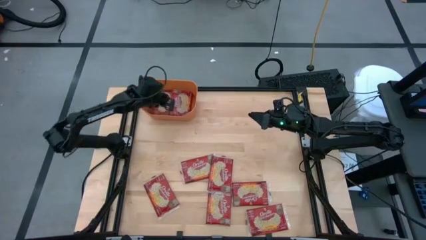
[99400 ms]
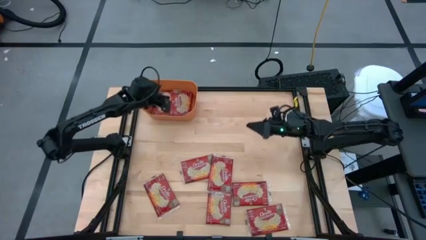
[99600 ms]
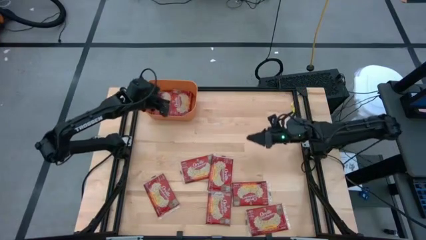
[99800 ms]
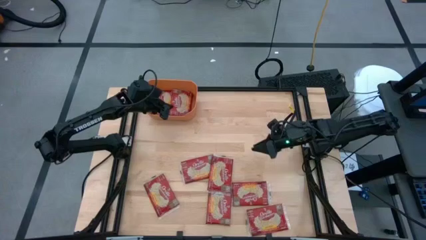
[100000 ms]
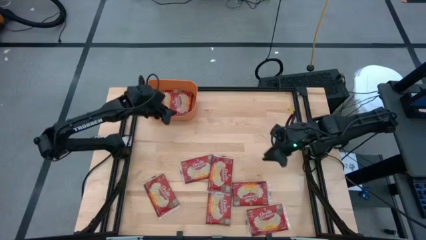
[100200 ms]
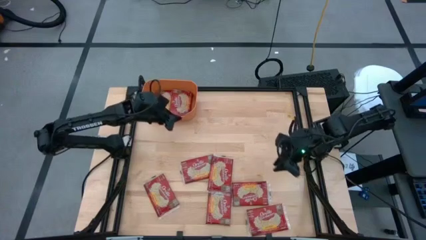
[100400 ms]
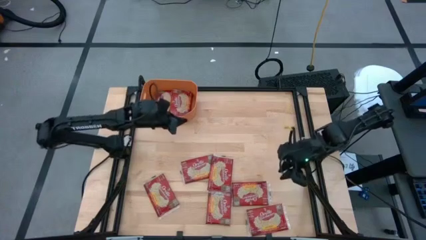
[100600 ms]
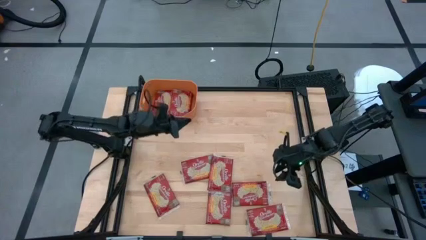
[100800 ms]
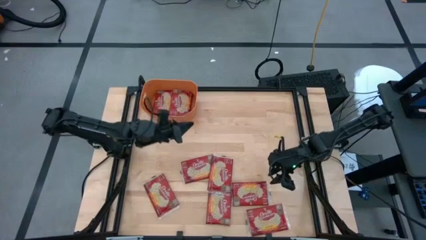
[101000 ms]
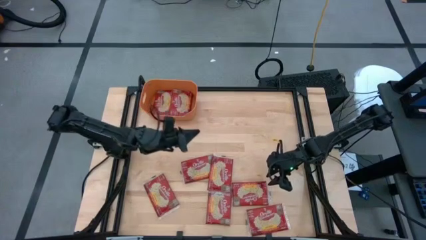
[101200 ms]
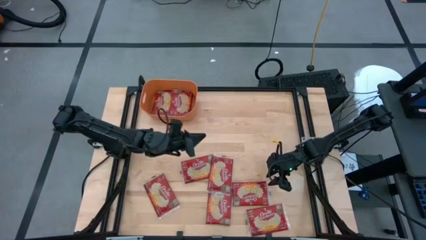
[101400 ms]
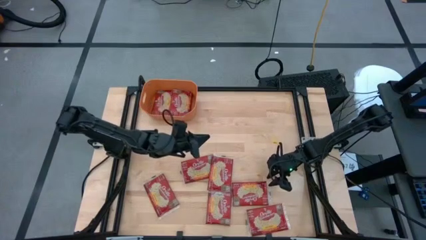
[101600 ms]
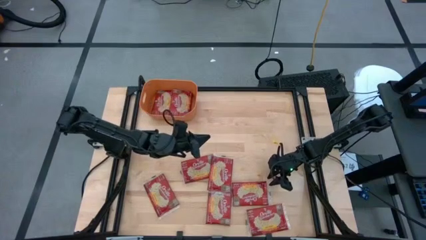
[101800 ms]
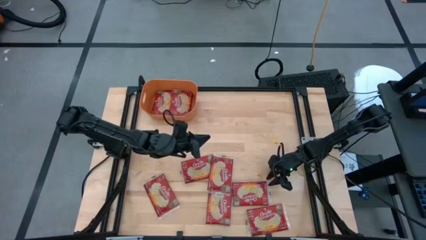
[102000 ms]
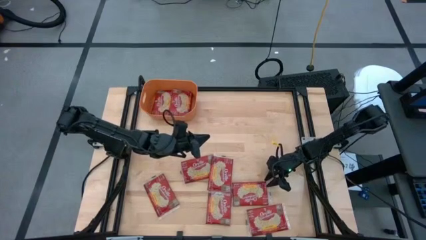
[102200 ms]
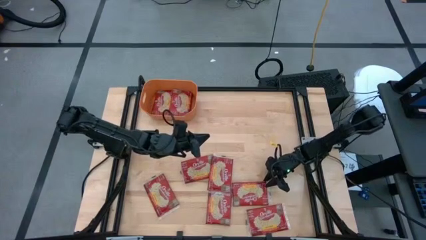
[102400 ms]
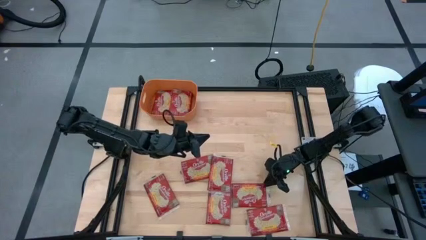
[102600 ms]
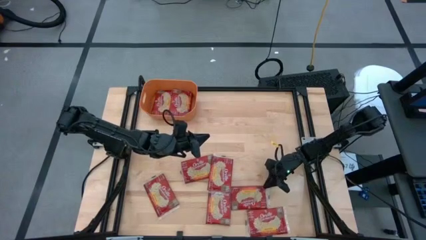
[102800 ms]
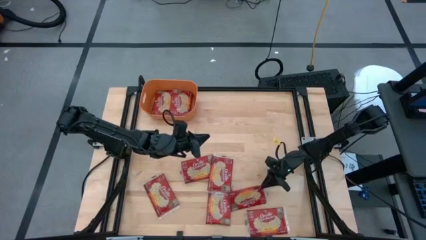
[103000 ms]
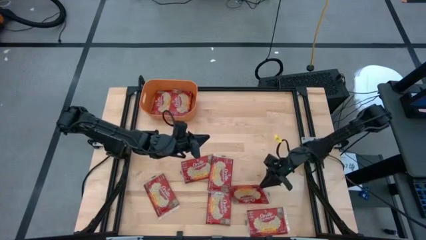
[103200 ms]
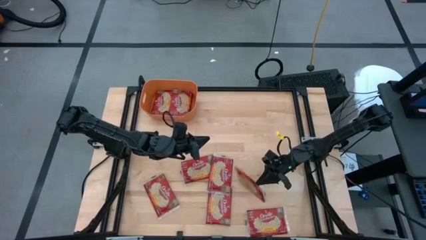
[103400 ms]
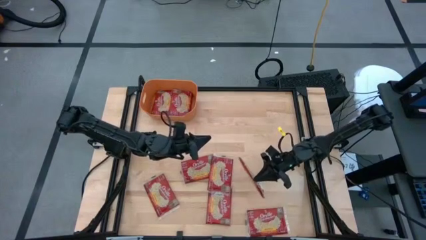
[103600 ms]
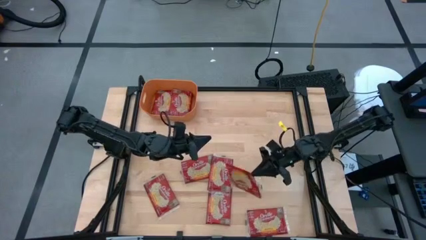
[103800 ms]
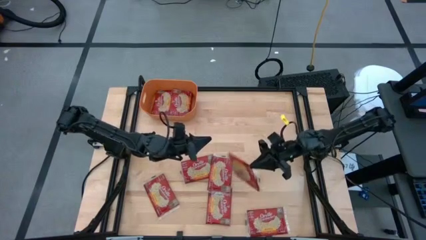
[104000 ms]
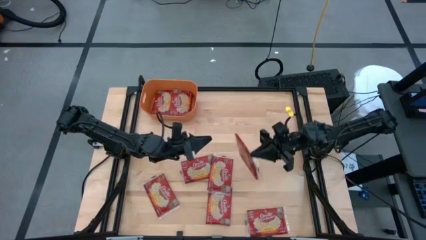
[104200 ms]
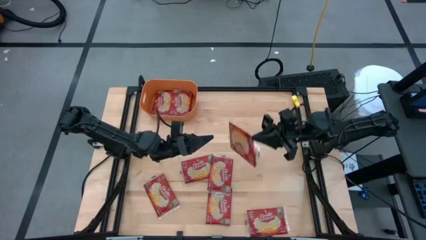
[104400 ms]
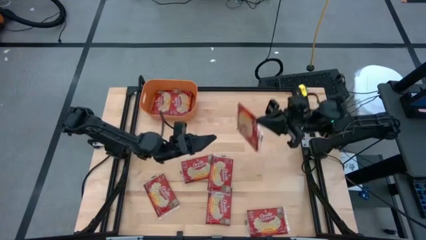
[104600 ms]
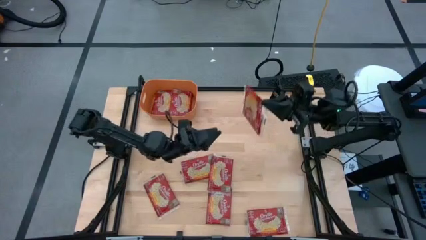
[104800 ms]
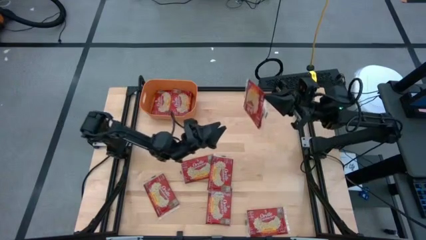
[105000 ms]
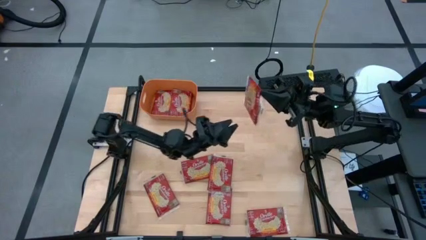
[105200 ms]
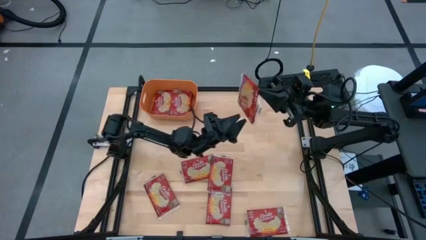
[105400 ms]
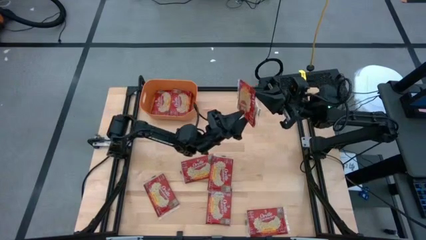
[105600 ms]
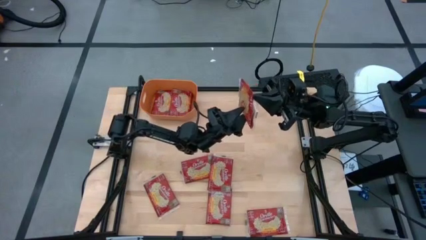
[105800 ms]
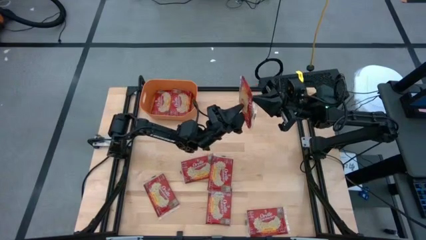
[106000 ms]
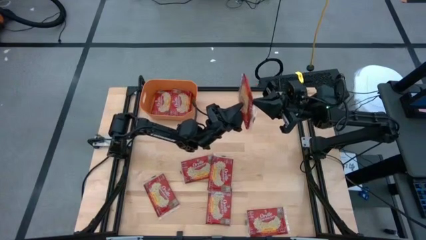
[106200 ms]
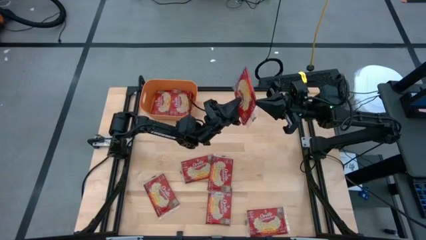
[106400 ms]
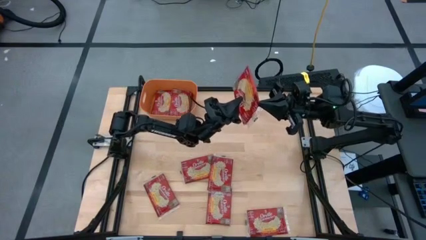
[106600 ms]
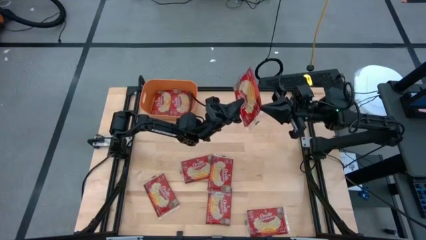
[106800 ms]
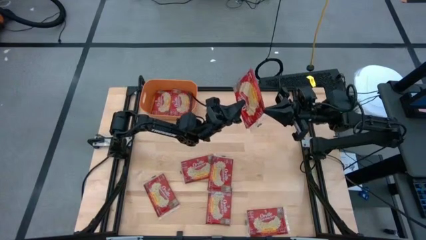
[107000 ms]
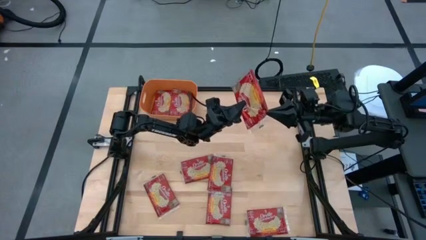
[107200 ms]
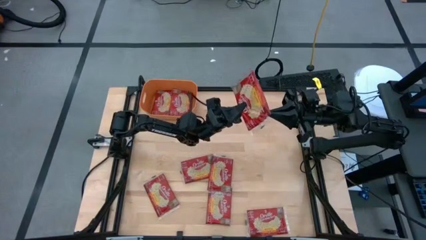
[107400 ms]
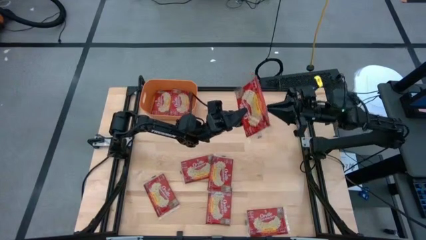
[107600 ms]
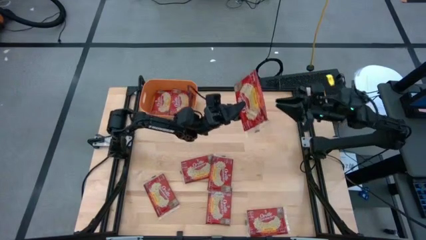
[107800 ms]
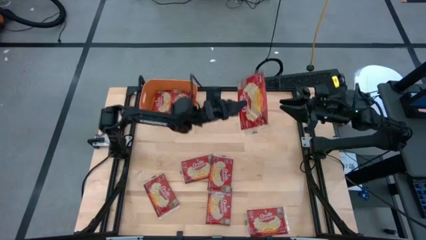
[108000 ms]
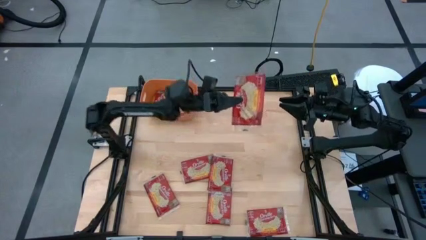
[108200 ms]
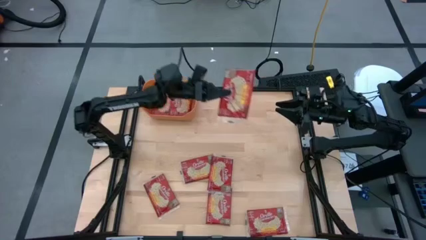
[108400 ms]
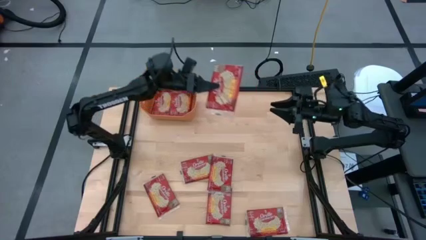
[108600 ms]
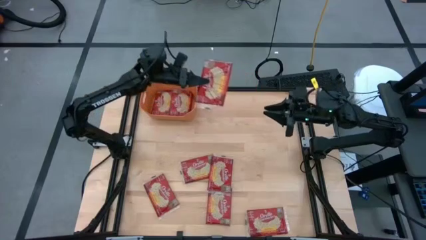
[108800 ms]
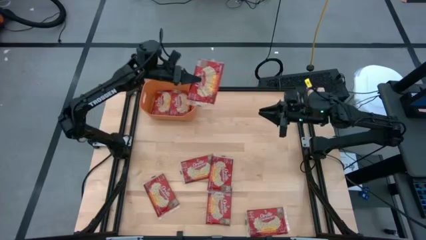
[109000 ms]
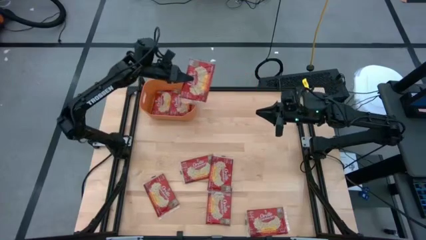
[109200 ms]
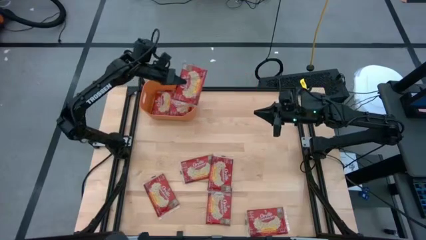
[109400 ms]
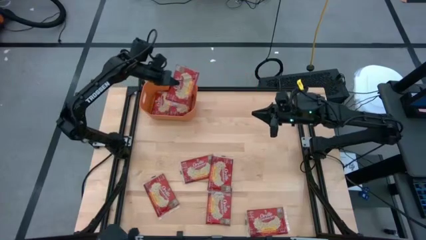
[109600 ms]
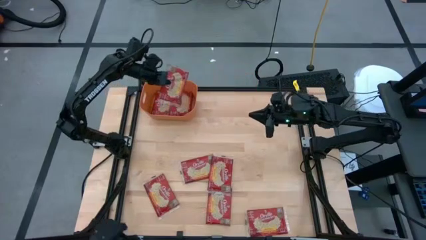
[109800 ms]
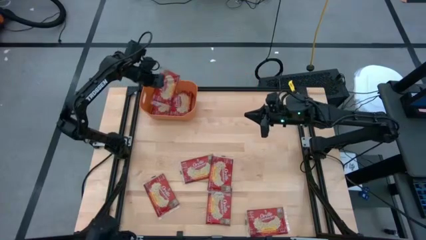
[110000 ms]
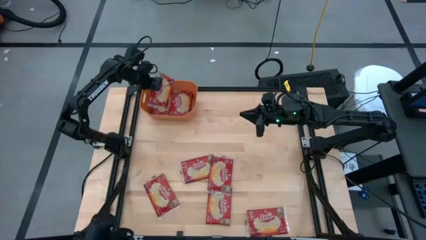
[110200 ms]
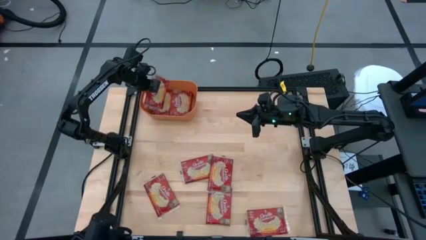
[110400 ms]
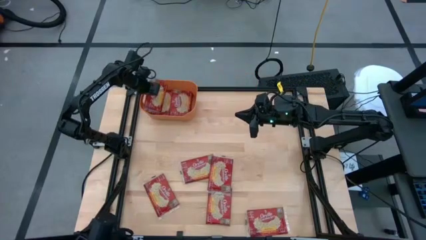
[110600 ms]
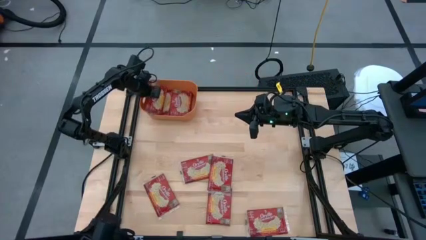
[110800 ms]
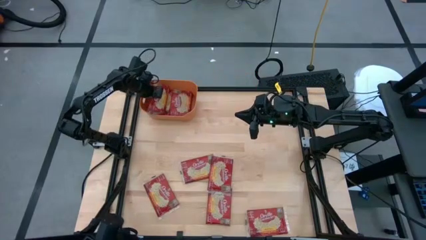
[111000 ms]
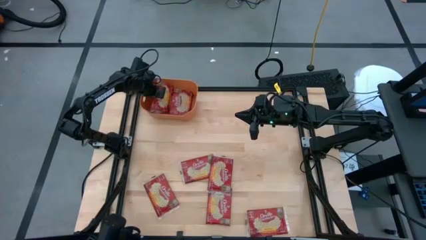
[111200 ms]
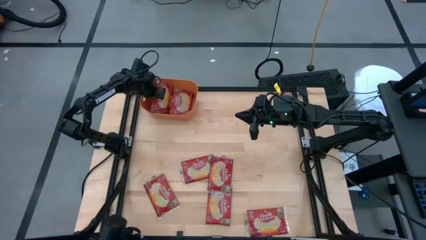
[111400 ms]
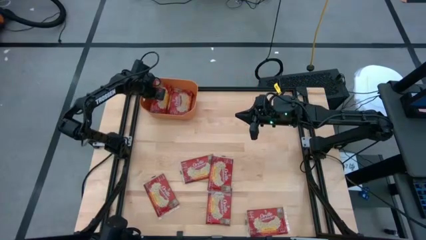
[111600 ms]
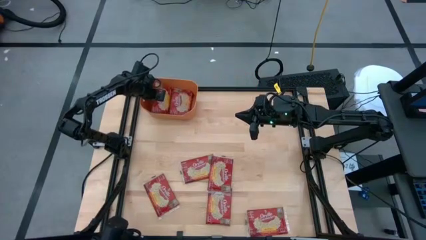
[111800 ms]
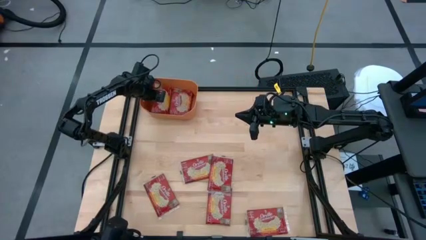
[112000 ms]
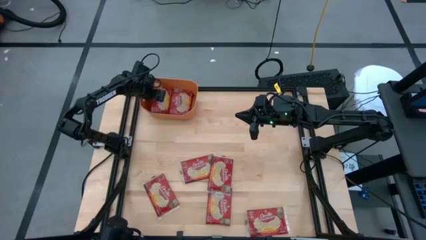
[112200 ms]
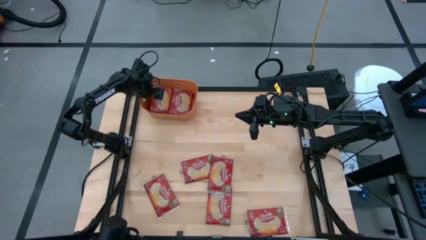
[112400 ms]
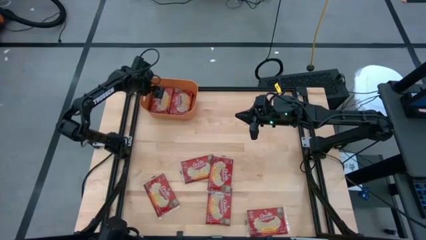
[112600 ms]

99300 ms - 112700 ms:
Task: Sort popcorn bags into baskets
Stack the red popcorn bag on top of the red popcorn bag in the orange bin
